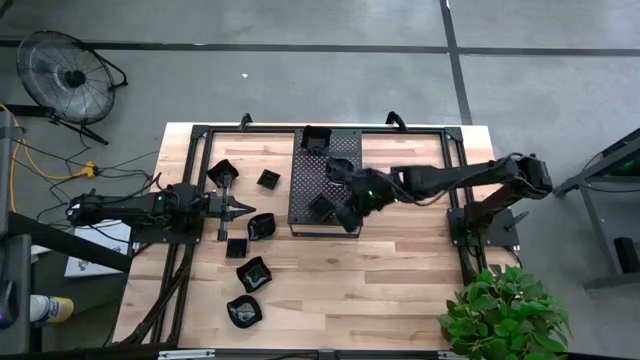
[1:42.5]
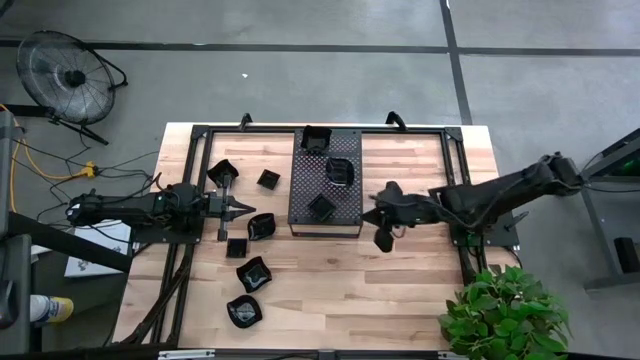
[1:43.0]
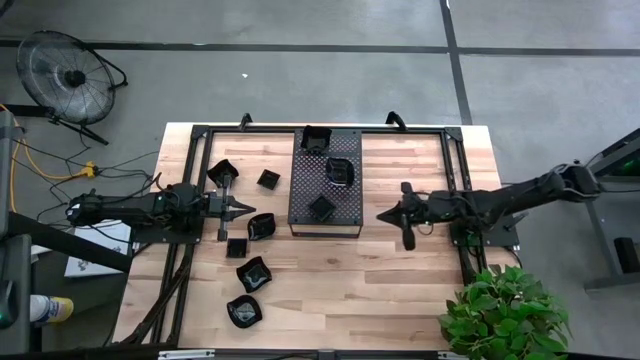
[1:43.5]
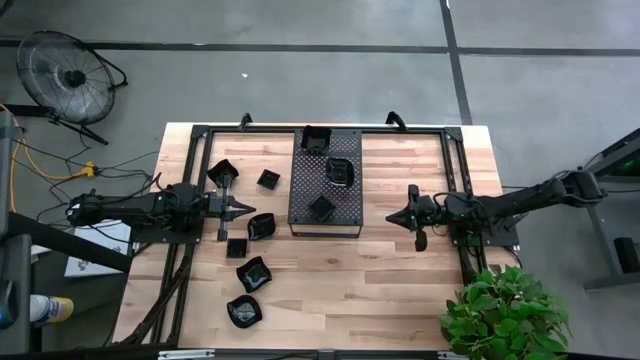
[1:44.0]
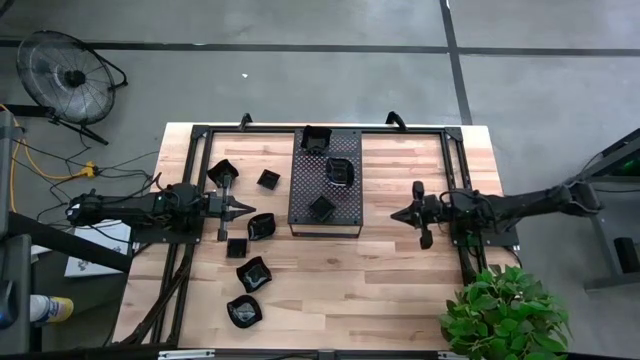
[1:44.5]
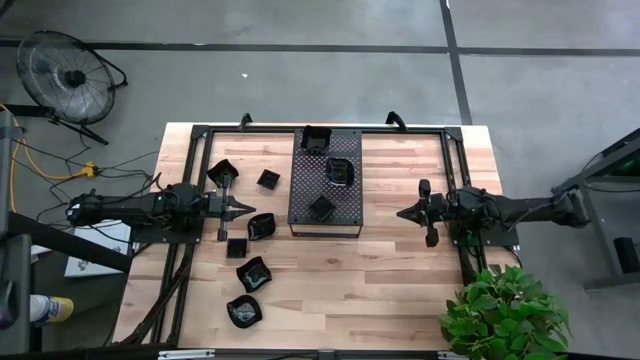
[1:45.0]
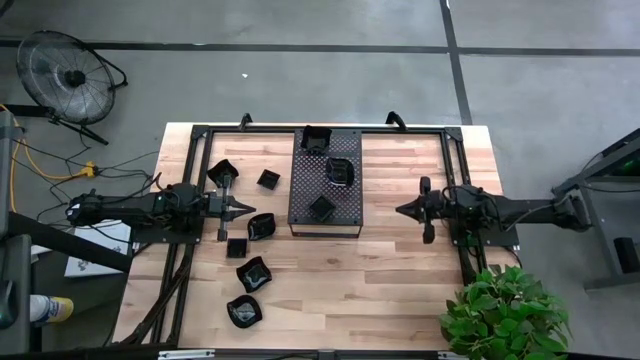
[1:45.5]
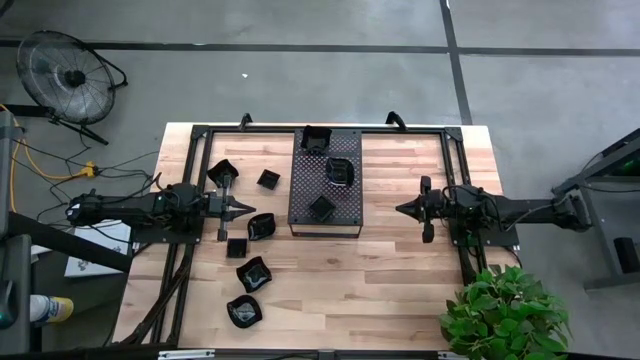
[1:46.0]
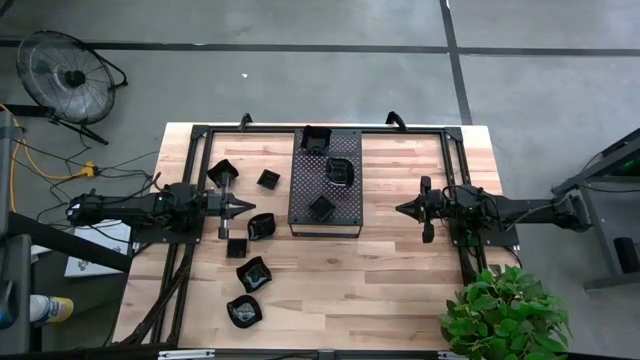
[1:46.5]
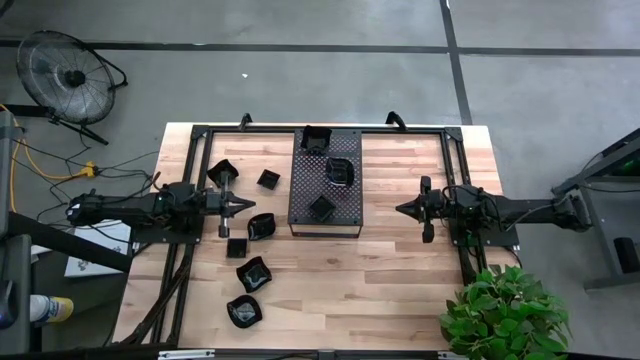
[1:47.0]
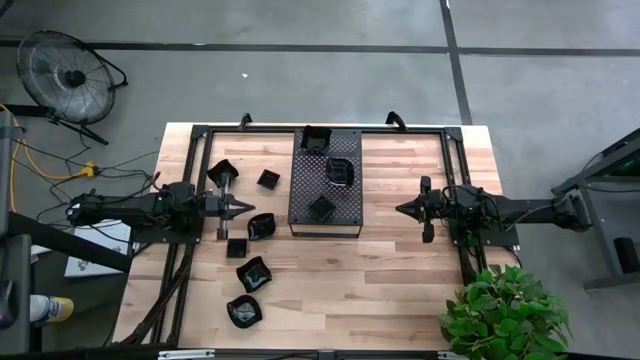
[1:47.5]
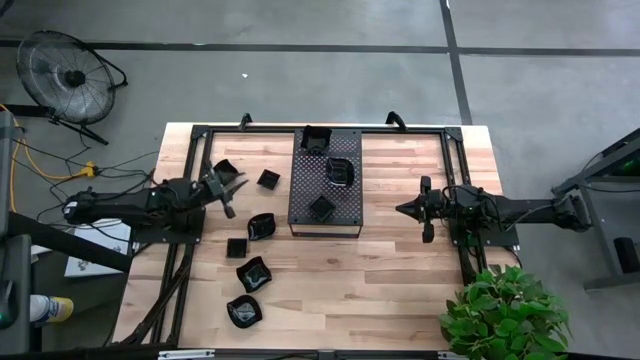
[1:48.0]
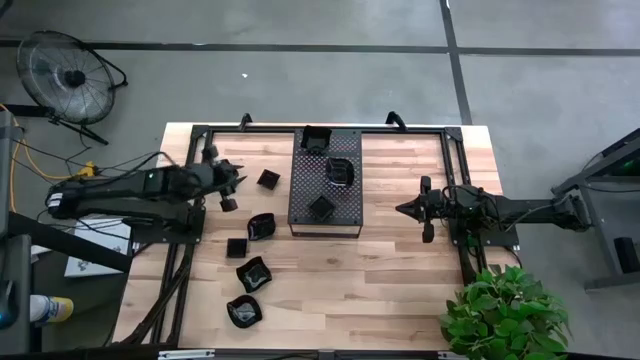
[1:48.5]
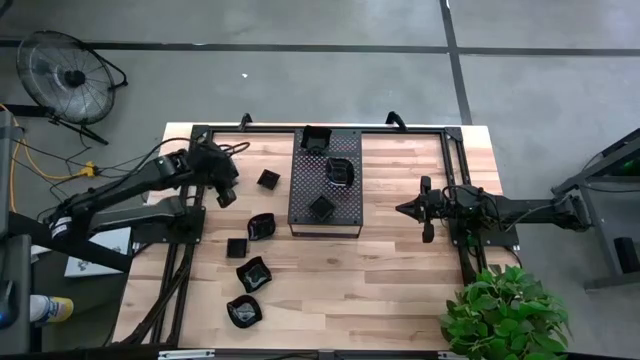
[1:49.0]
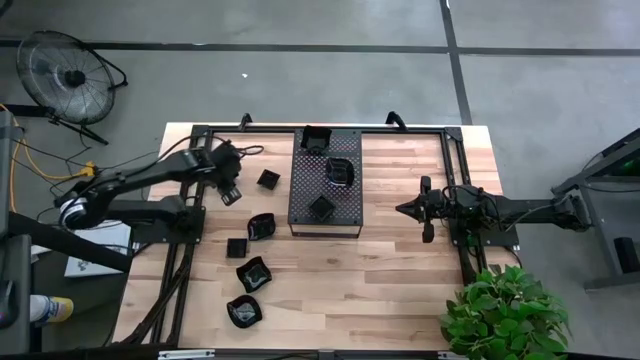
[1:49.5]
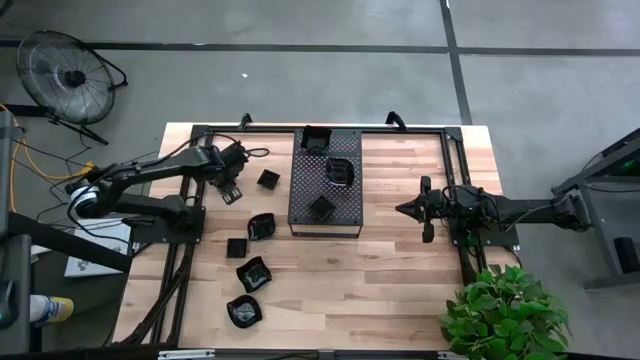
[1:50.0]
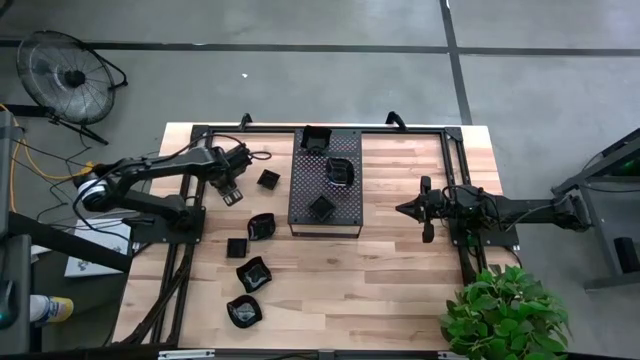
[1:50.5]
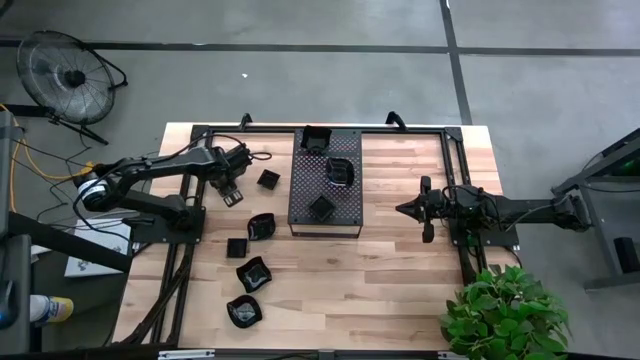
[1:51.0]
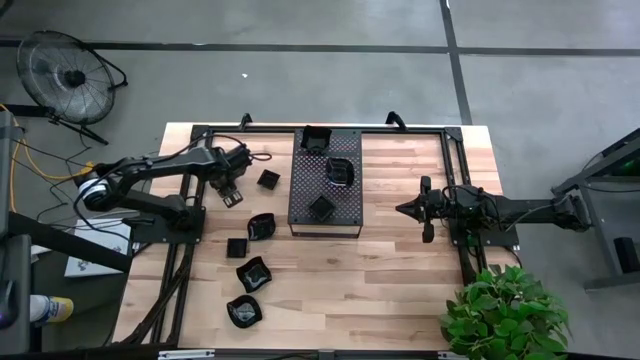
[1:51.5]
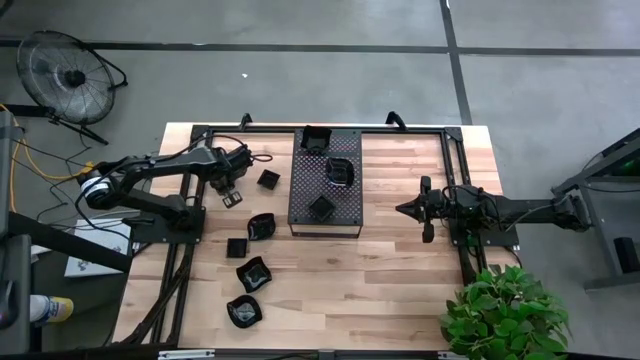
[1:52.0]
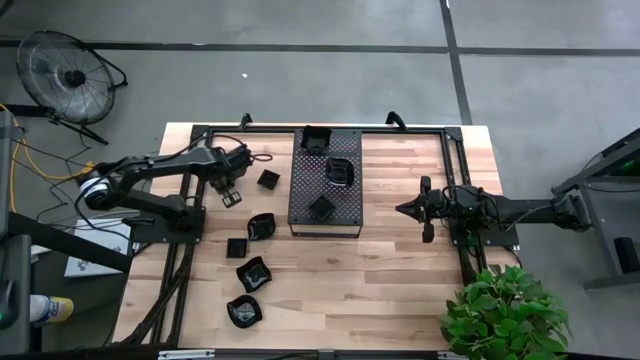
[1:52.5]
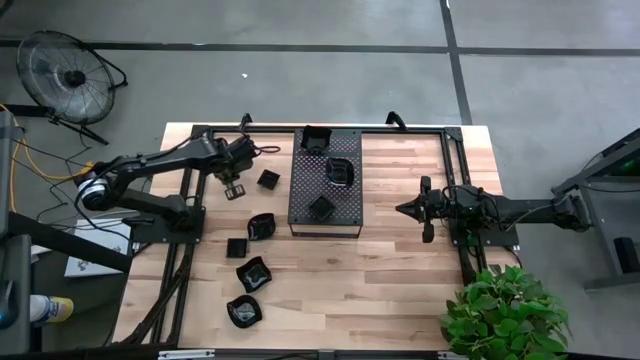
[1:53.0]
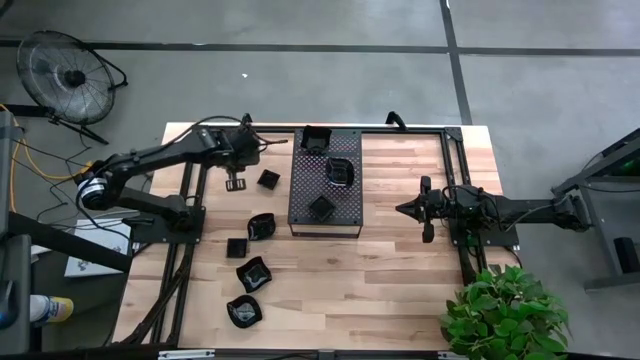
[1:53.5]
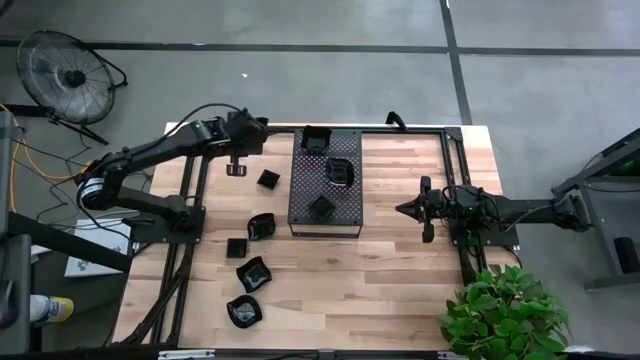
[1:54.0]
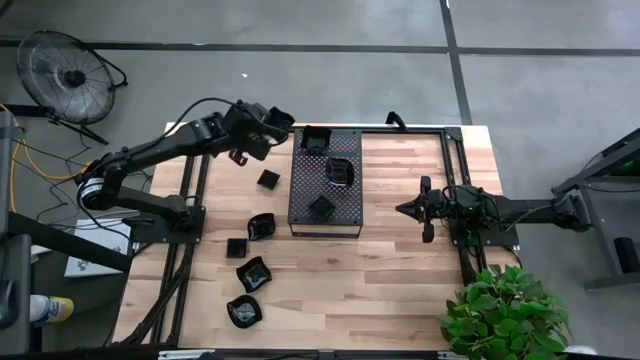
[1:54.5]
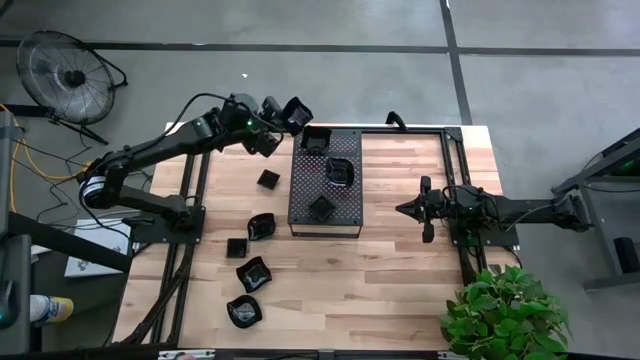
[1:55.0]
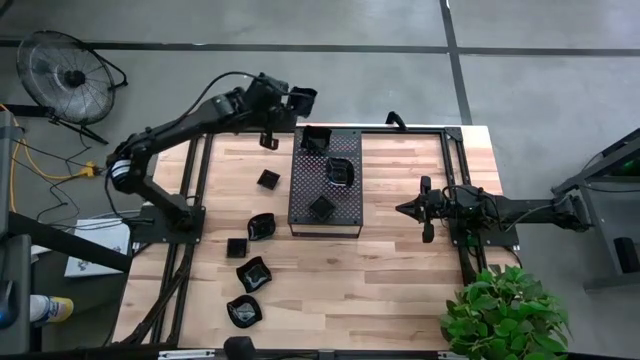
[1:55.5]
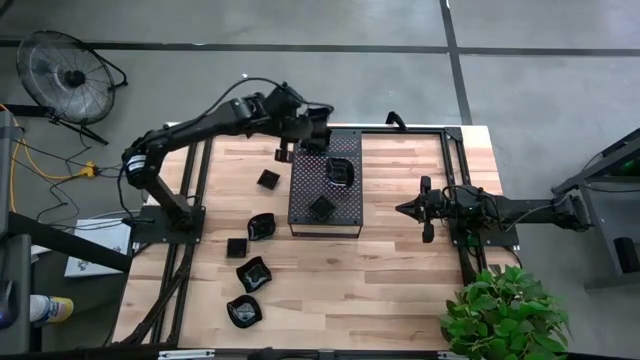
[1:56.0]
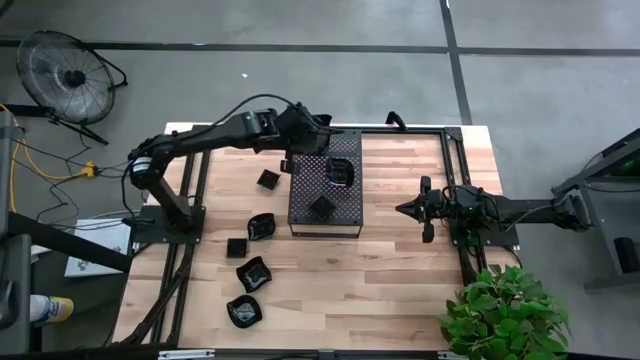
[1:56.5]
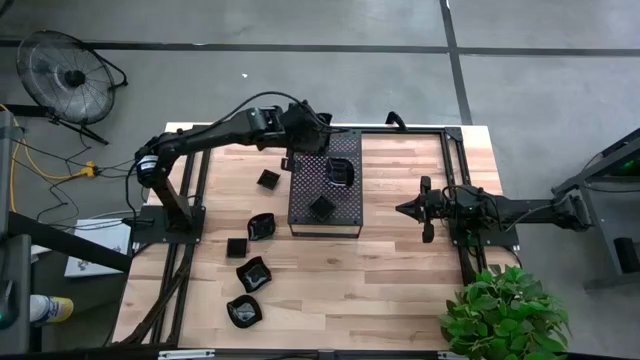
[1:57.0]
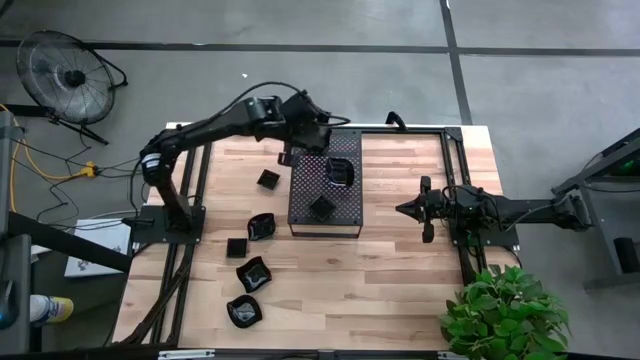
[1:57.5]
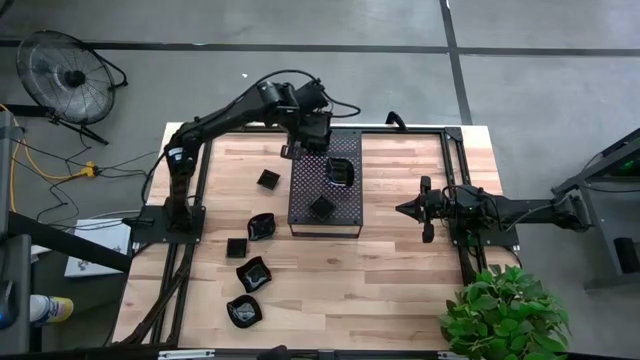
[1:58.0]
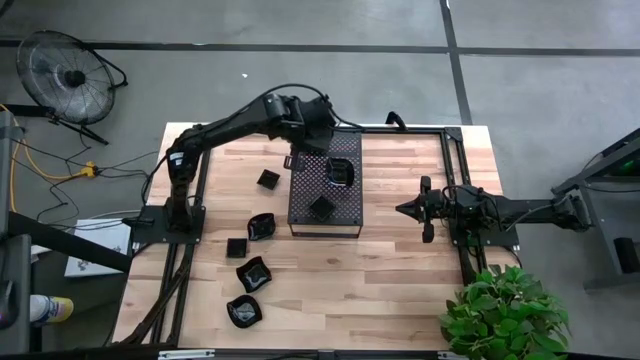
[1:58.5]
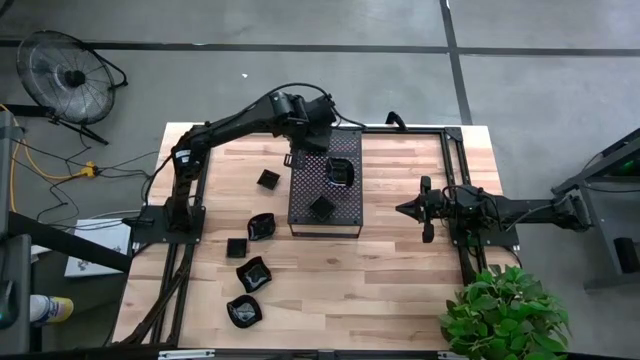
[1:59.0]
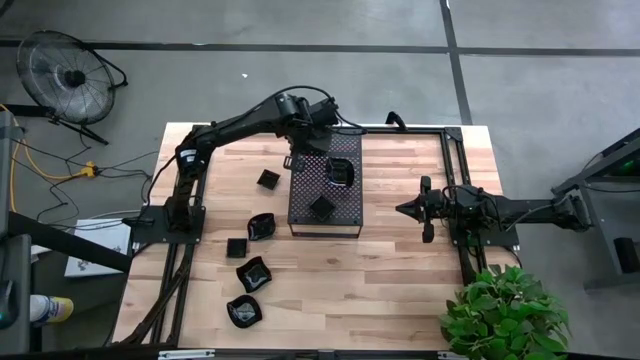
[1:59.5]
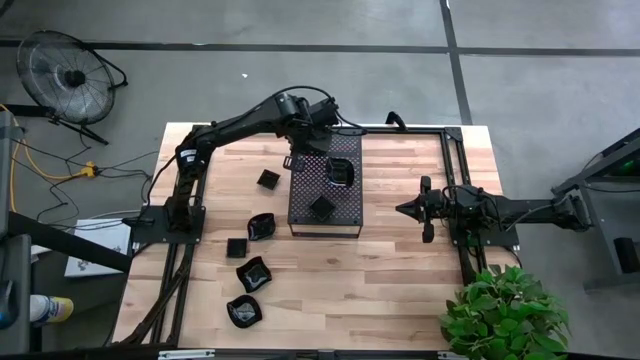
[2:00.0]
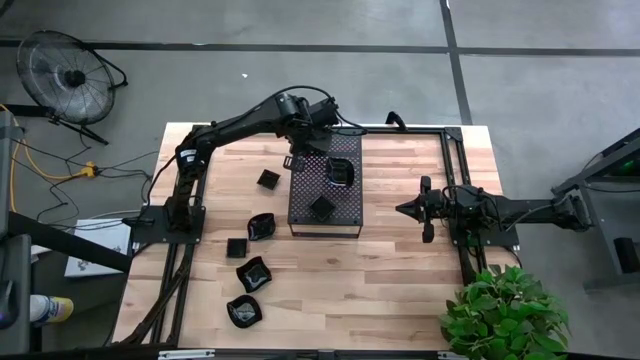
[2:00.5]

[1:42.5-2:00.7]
Task: Pick & Place Mini shaped plates
Stack the black distorted square plate on top of the other black distorted square plate on the shelf

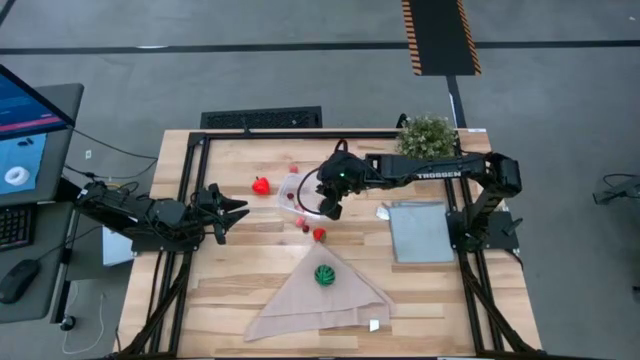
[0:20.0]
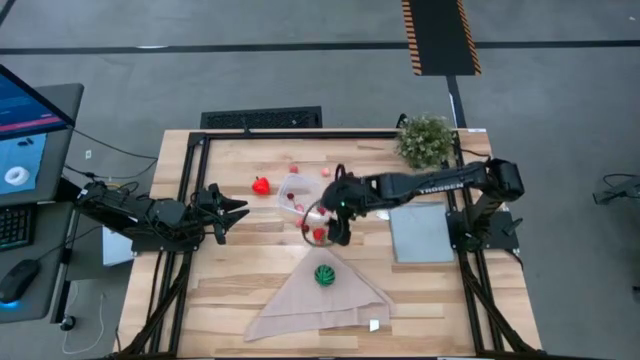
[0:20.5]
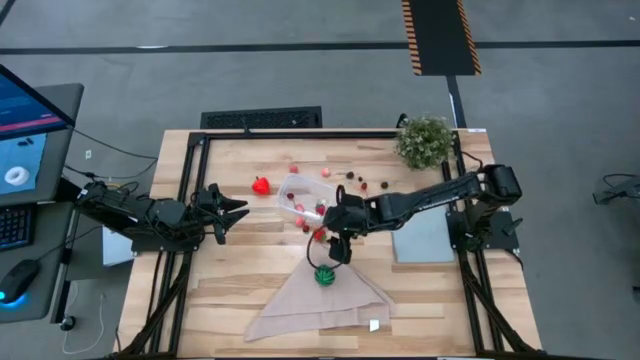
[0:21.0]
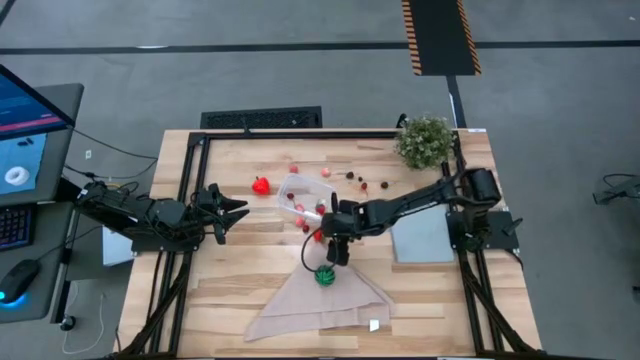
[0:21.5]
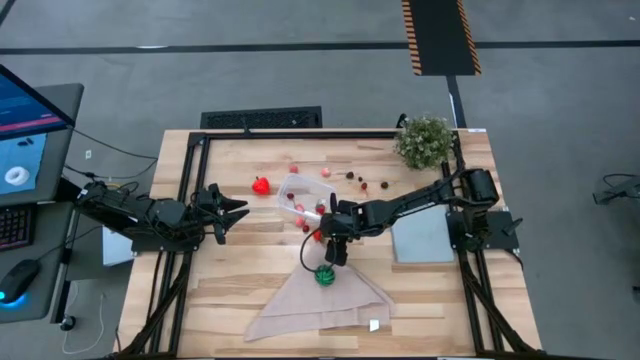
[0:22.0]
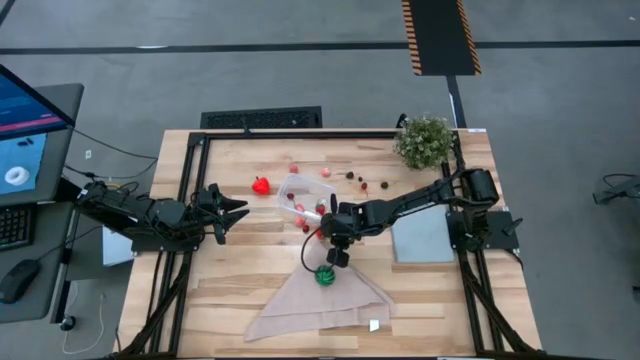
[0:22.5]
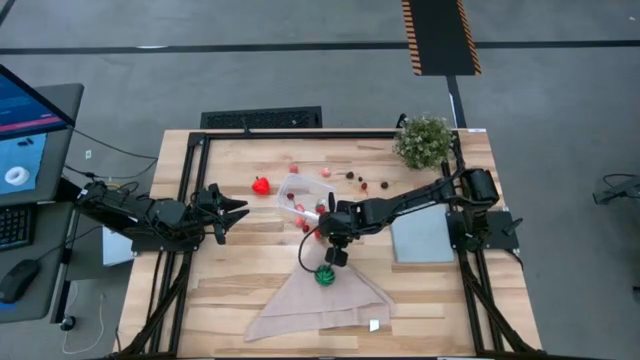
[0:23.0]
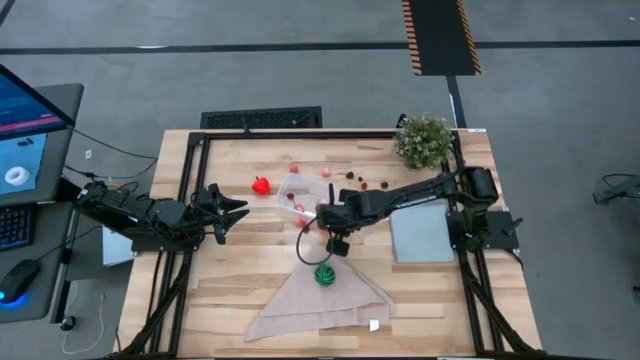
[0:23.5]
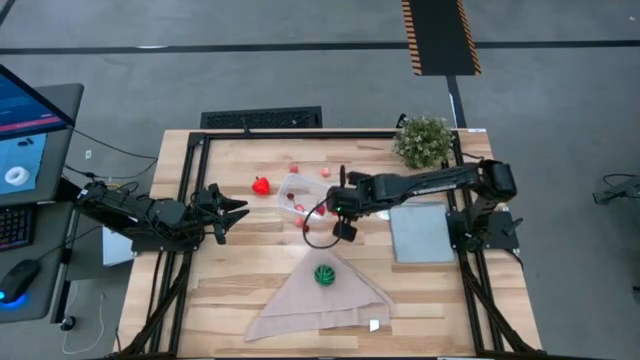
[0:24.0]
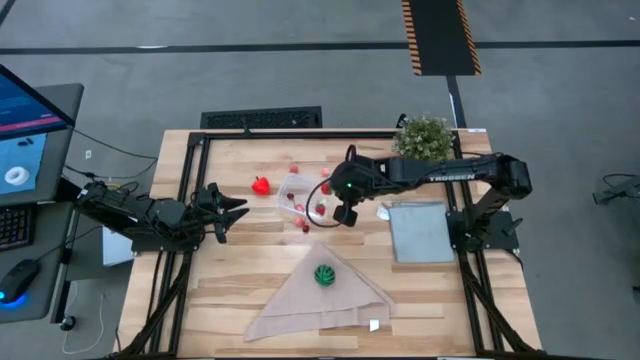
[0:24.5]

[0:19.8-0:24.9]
Task: Pick and placing Produce into tupperware
Put the strawberry into the transparent bin
